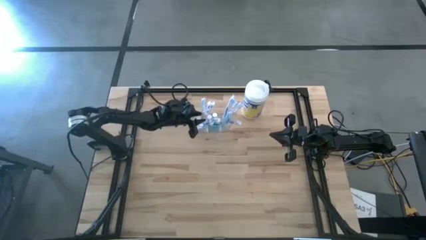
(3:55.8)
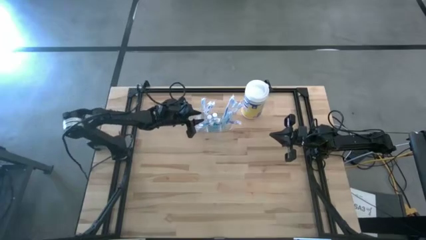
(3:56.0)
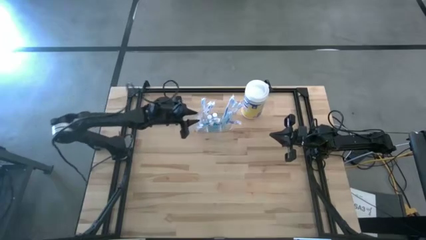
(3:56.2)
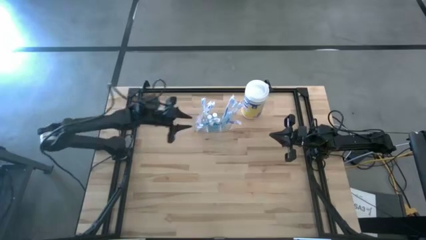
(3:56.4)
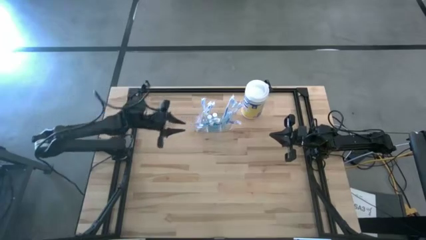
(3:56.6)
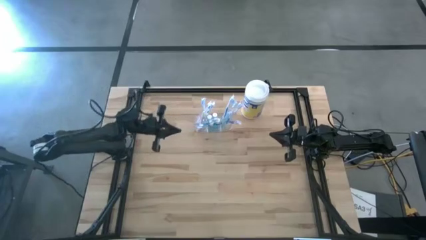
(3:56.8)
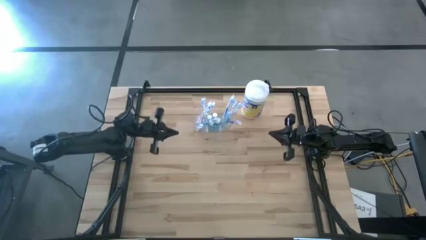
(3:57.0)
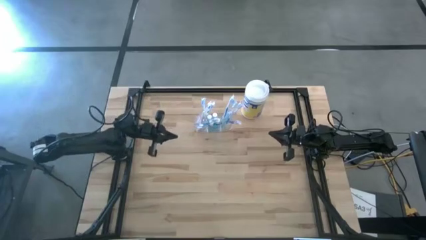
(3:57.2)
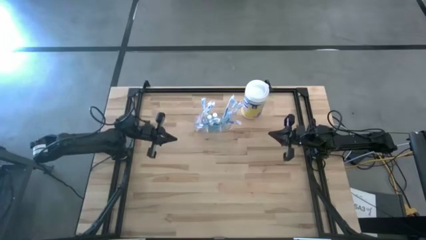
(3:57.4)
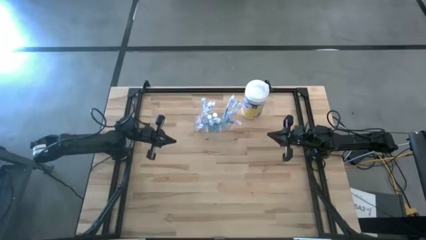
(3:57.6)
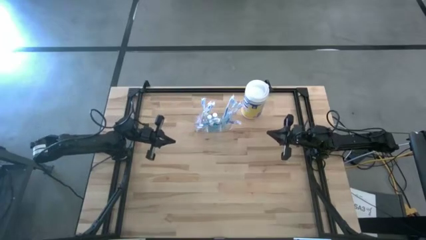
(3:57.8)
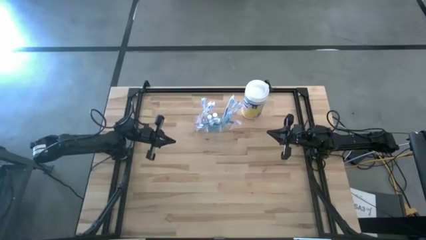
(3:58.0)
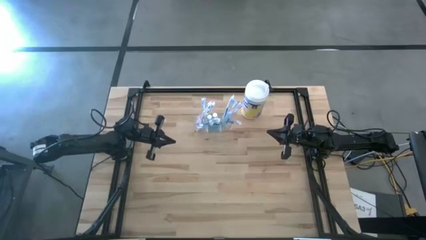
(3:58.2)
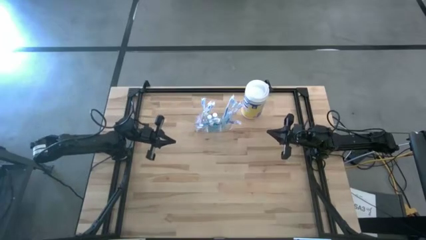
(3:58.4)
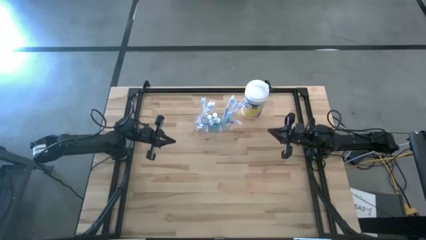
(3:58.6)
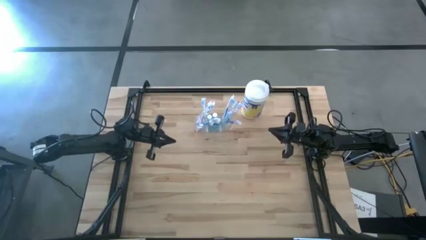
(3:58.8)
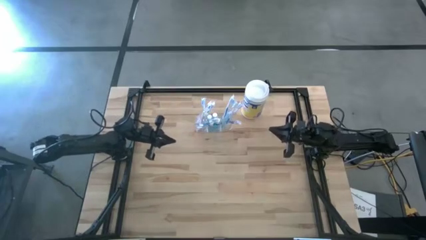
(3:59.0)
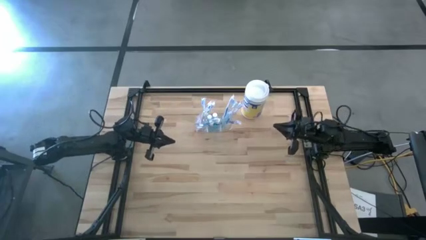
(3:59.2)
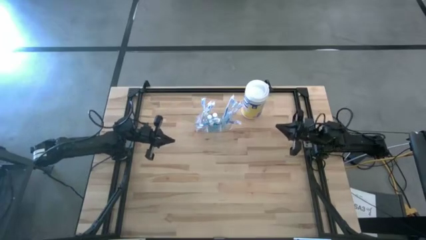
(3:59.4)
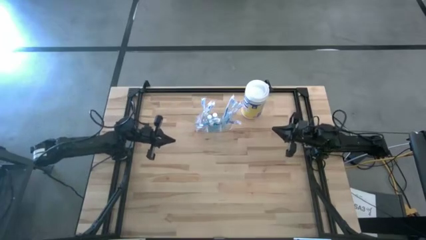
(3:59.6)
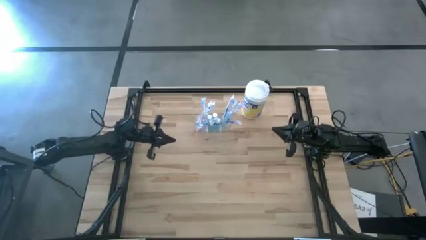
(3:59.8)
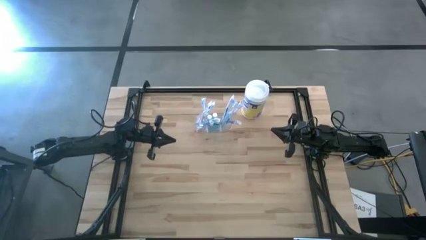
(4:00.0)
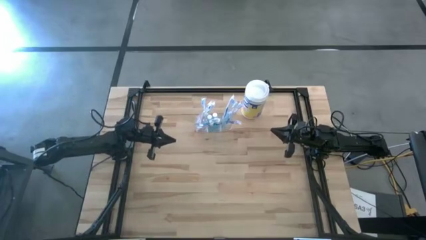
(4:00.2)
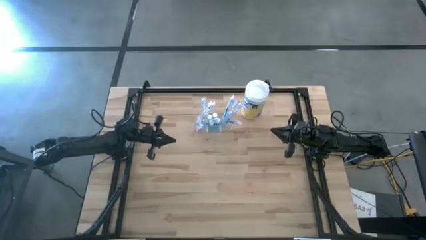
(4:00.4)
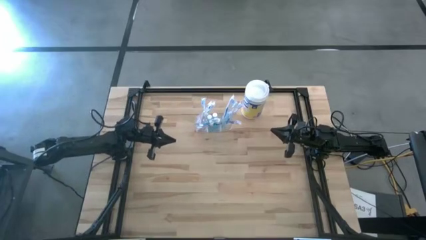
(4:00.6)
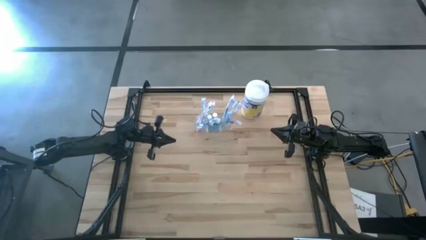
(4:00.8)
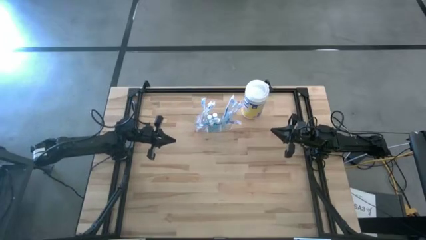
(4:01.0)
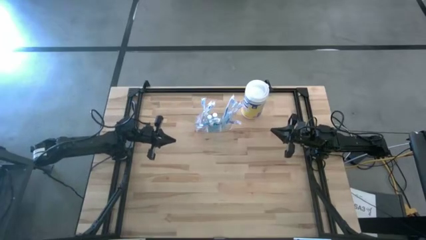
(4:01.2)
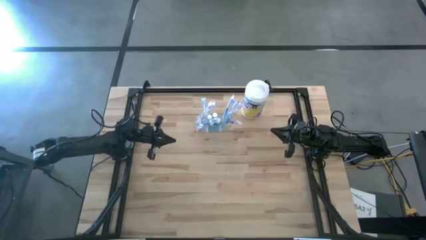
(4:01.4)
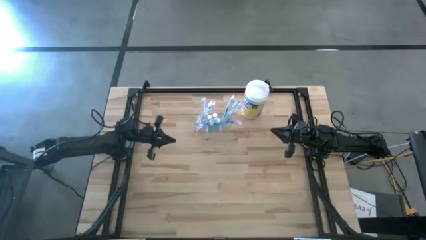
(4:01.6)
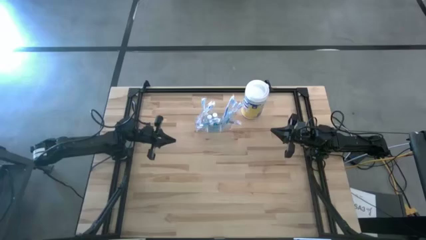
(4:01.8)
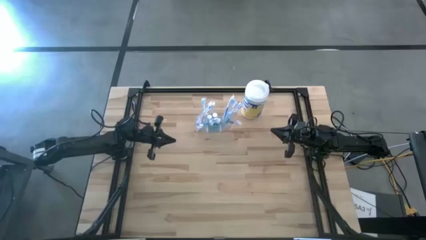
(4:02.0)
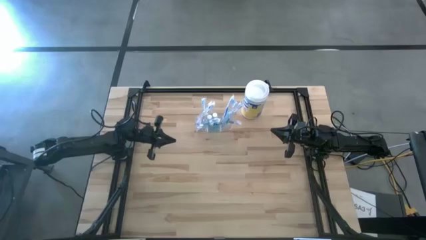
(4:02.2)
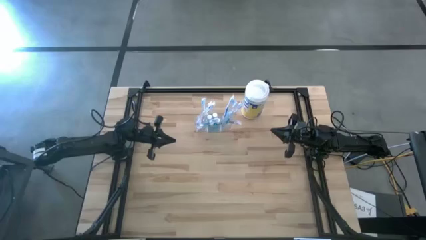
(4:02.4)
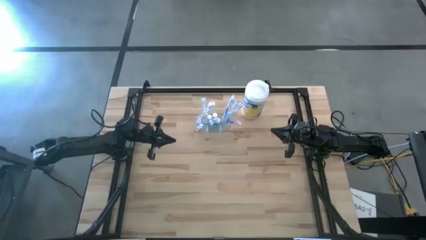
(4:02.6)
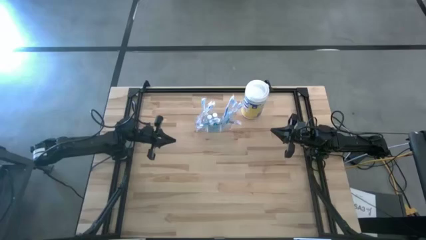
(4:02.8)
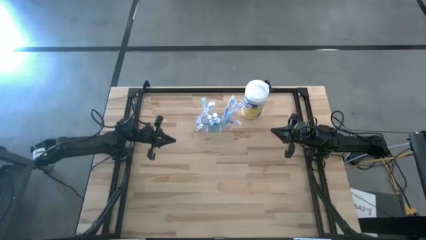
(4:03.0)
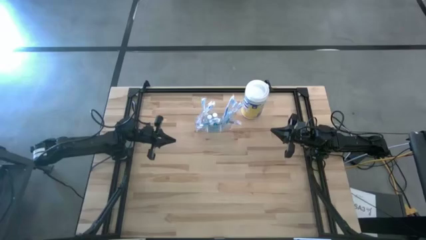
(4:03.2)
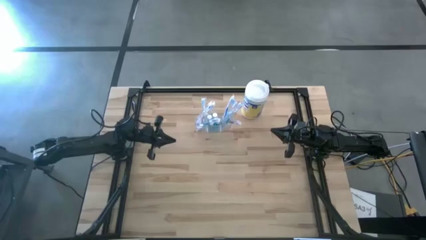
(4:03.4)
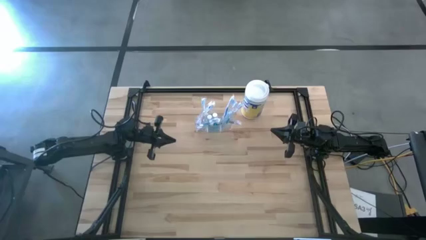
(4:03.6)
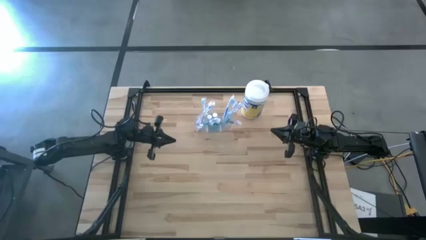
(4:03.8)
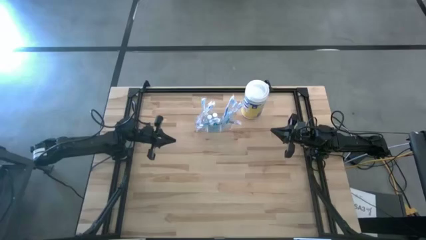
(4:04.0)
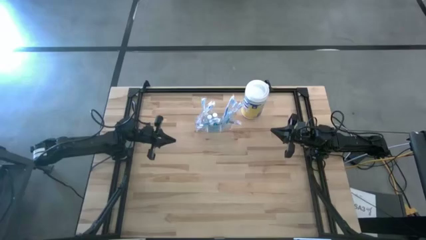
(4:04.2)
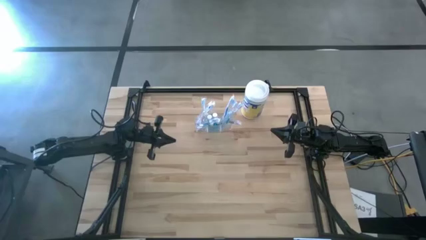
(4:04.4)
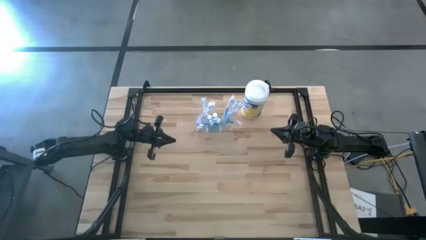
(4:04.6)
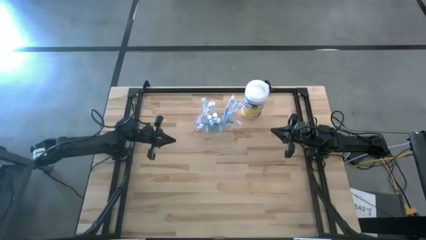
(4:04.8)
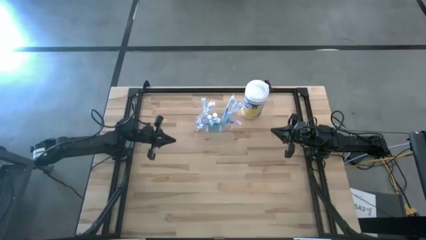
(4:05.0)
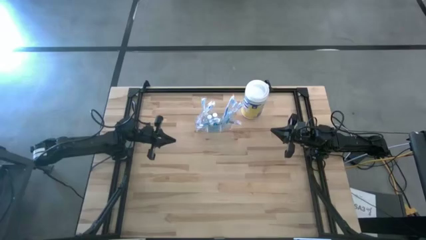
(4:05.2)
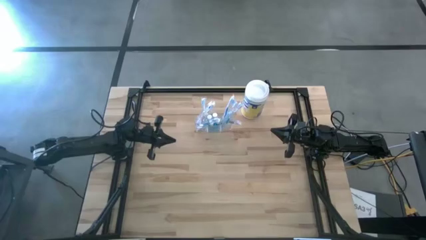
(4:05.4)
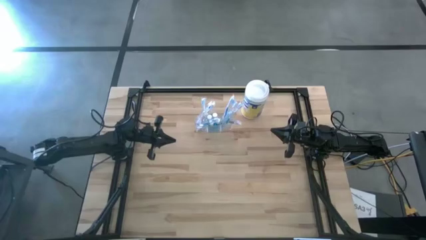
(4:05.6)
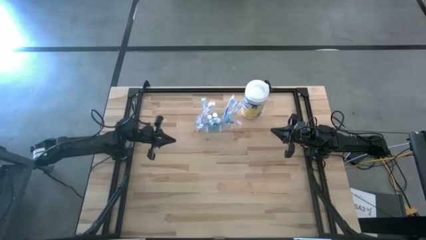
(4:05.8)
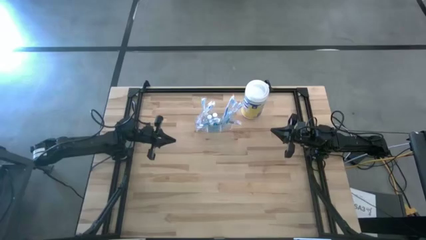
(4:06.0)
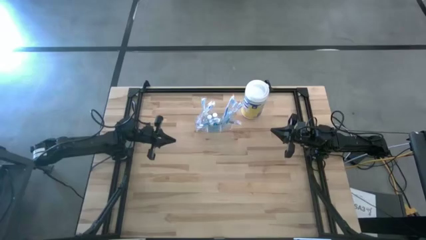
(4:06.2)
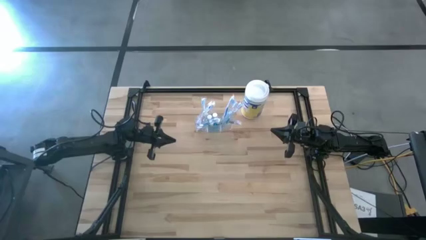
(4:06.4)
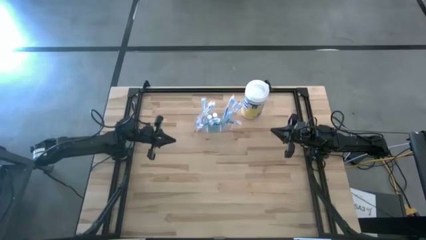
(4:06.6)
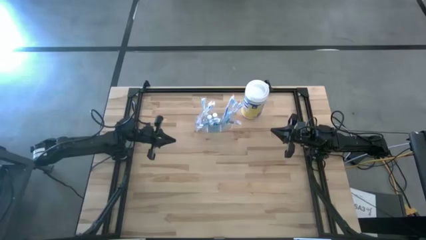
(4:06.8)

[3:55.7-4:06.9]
Task: Pick & Place toothbrushing station
Return to Home Position

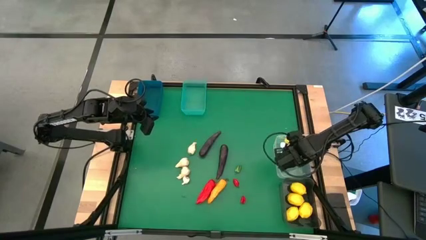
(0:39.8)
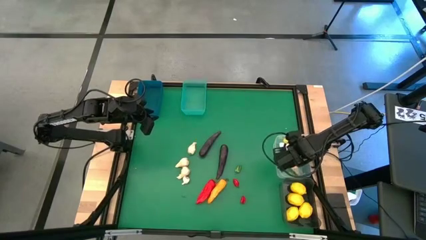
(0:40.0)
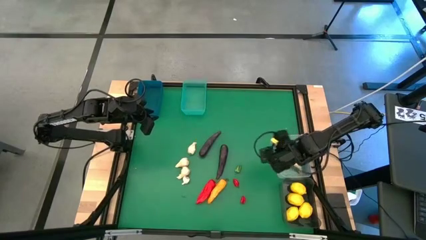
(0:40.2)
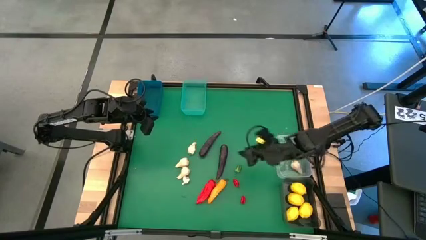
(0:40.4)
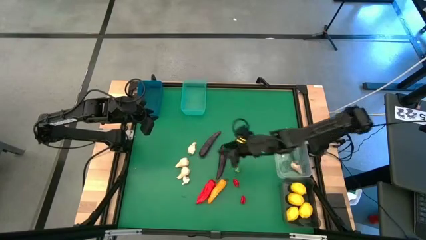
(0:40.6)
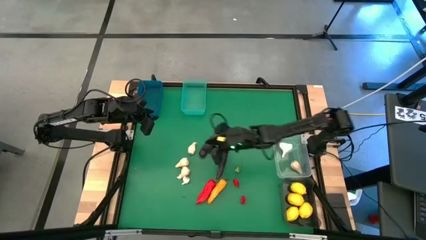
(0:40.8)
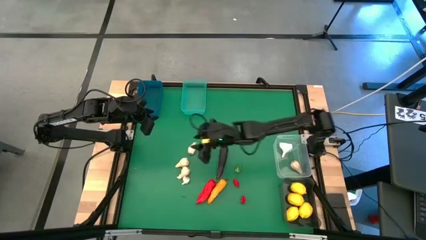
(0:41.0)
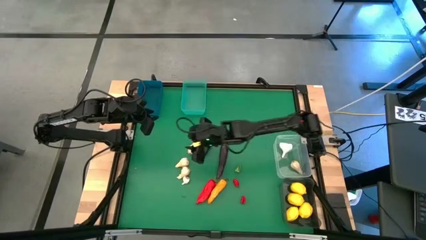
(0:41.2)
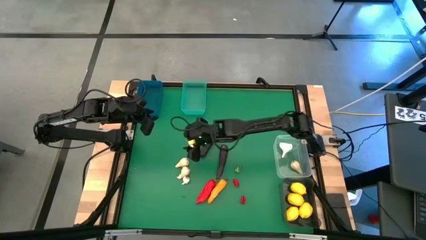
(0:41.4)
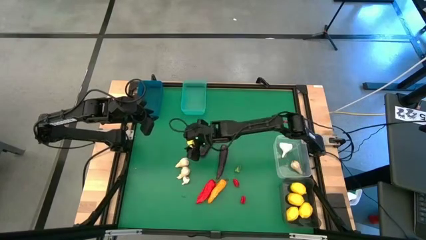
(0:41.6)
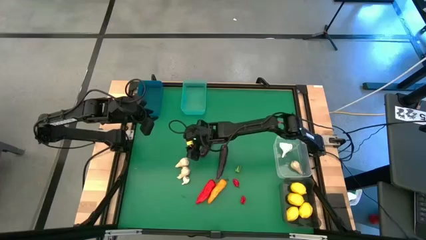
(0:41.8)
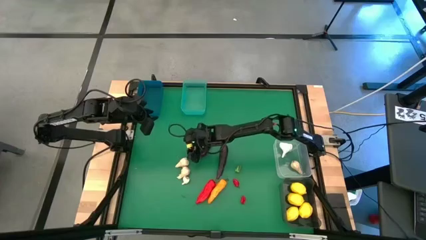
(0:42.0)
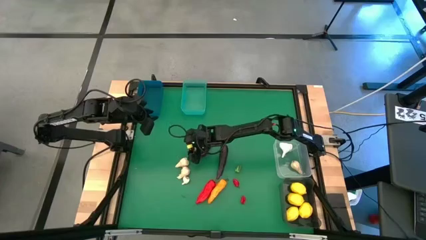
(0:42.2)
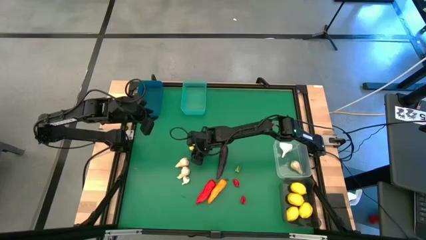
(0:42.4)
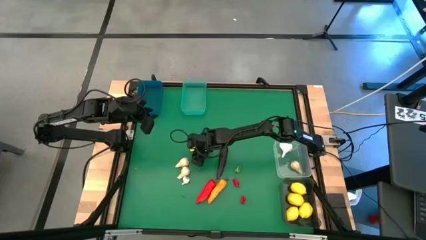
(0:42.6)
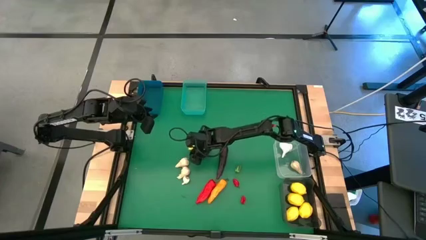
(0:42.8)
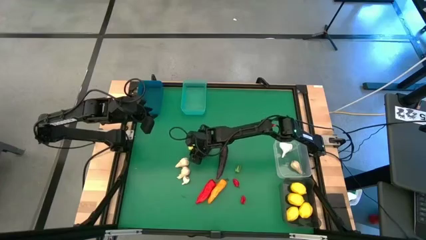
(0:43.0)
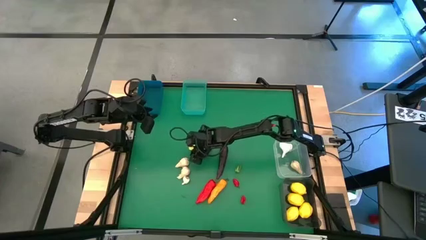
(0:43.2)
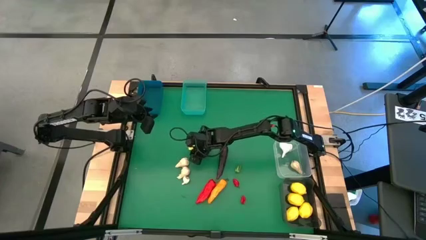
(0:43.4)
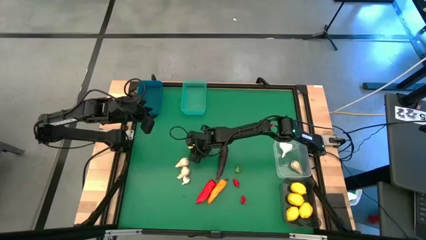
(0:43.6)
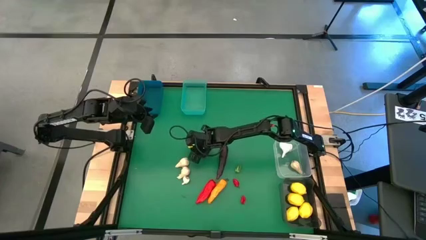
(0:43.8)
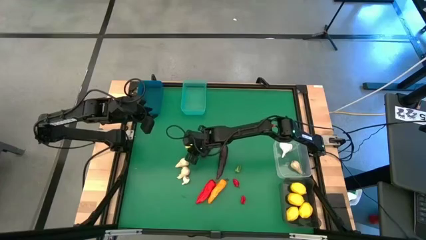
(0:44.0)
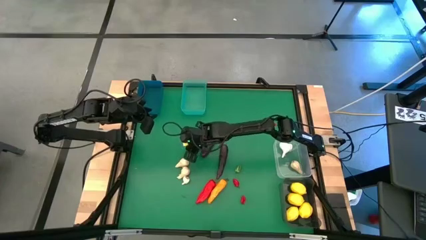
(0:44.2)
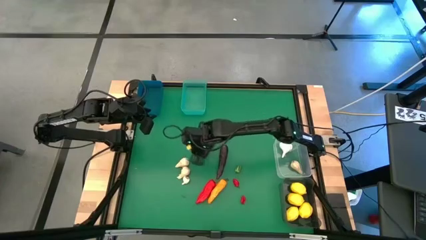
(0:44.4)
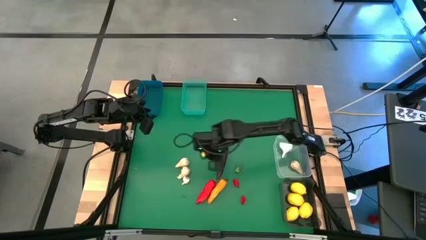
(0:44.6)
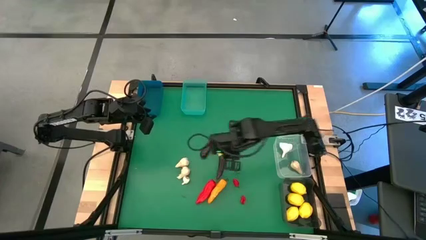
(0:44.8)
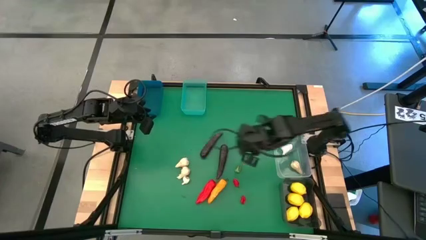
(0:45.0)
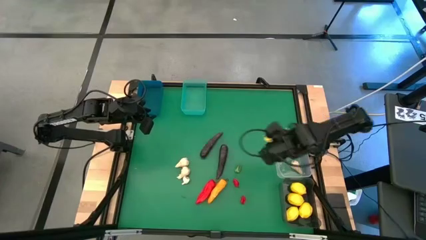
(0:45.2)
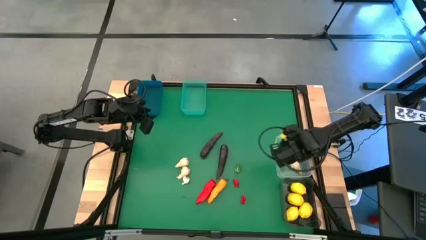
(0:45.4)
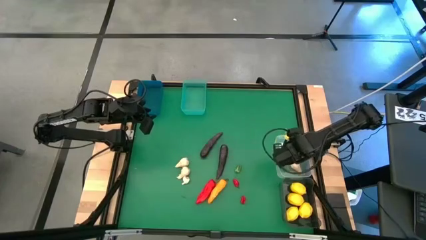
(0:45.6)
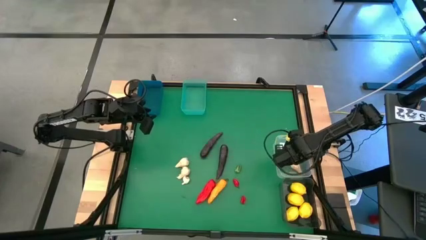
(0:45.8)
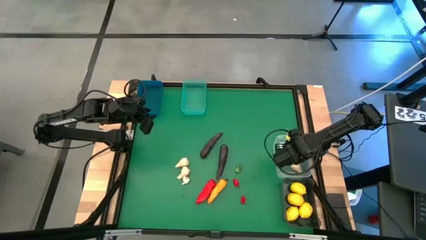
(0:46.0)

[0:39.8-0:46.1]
Task: Sort produce into baskets
Put the white garlic into the transparent bin
